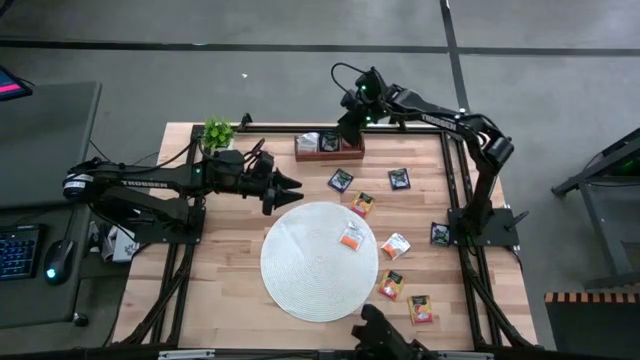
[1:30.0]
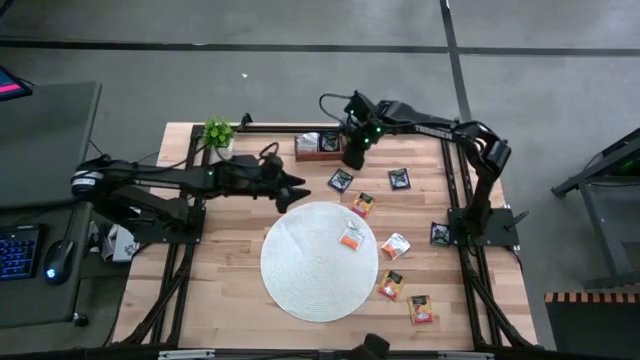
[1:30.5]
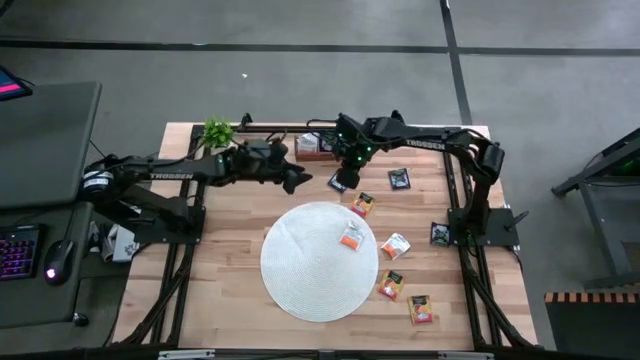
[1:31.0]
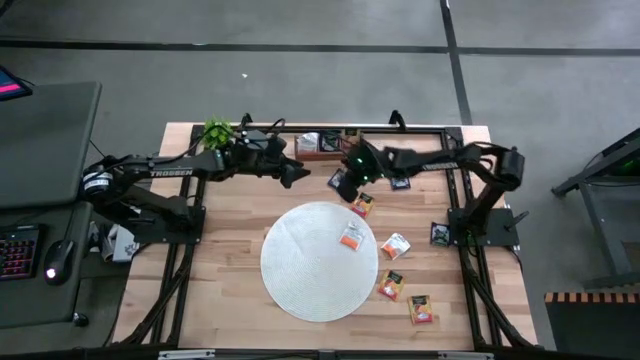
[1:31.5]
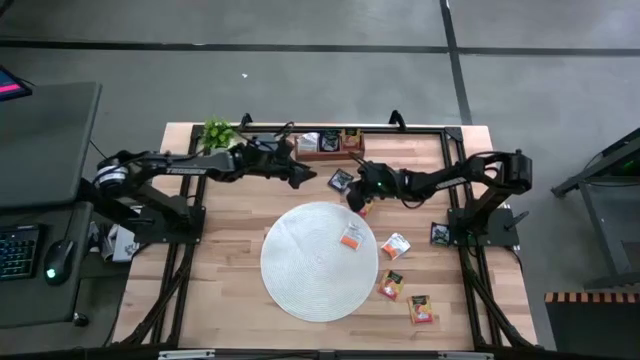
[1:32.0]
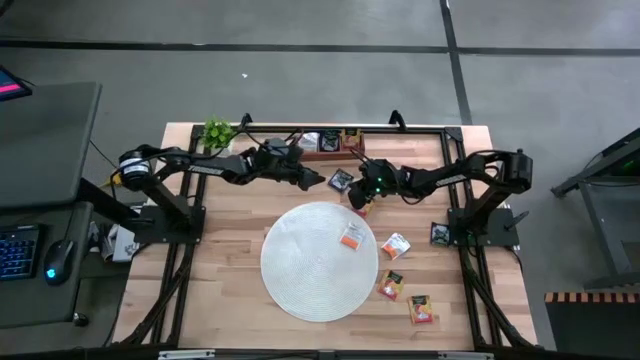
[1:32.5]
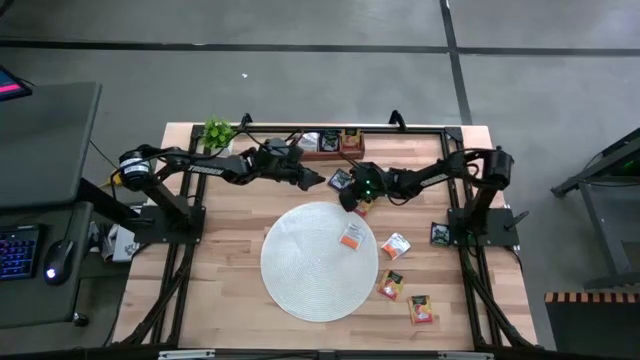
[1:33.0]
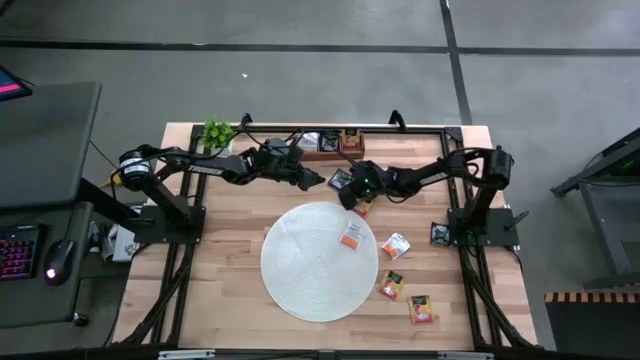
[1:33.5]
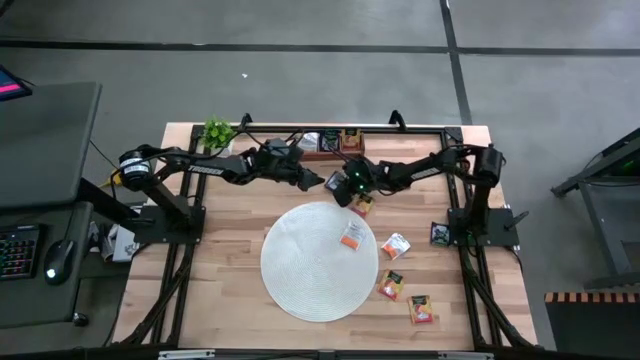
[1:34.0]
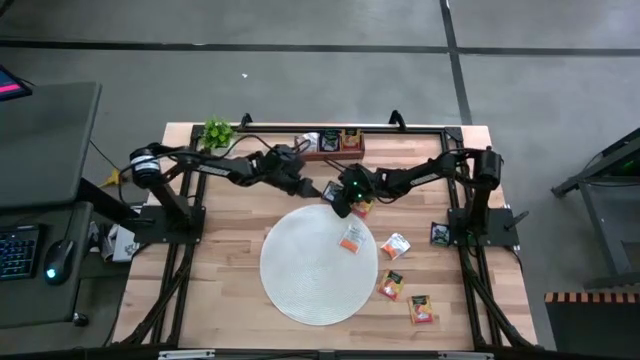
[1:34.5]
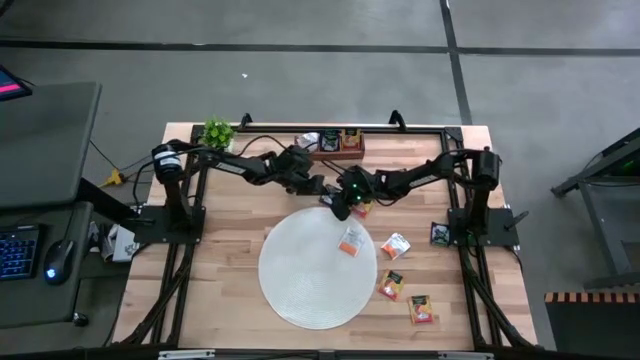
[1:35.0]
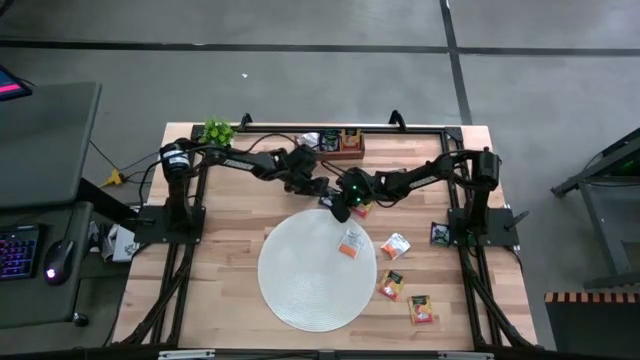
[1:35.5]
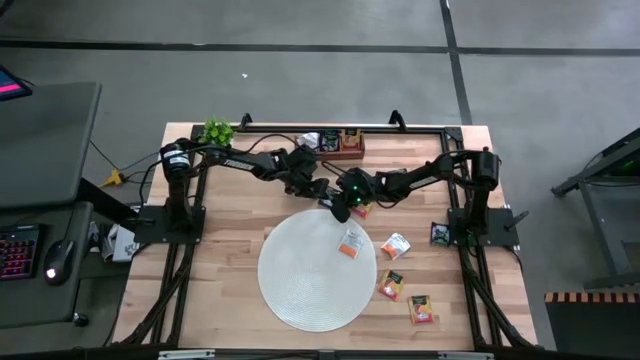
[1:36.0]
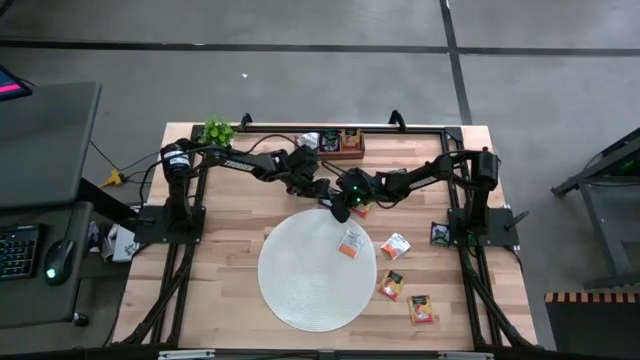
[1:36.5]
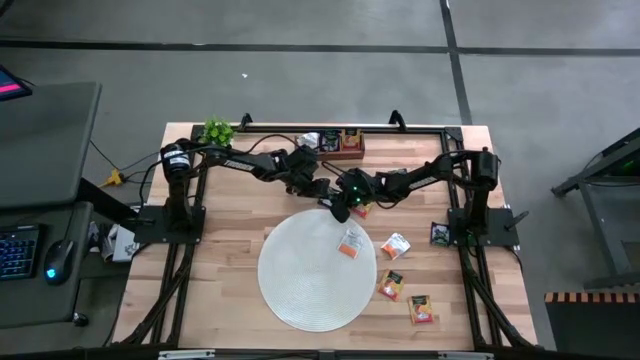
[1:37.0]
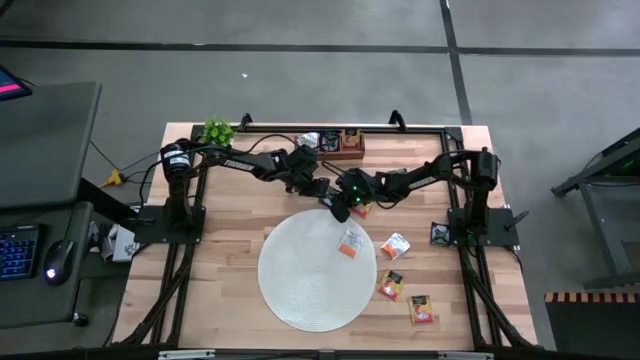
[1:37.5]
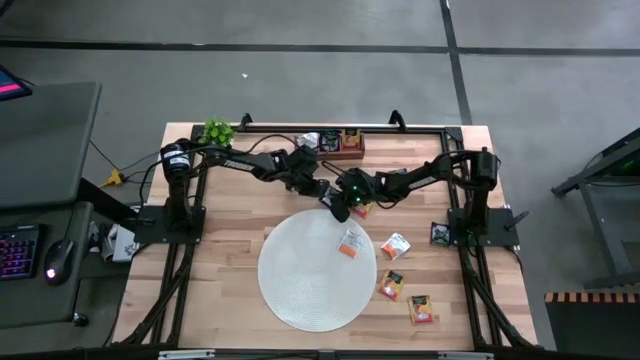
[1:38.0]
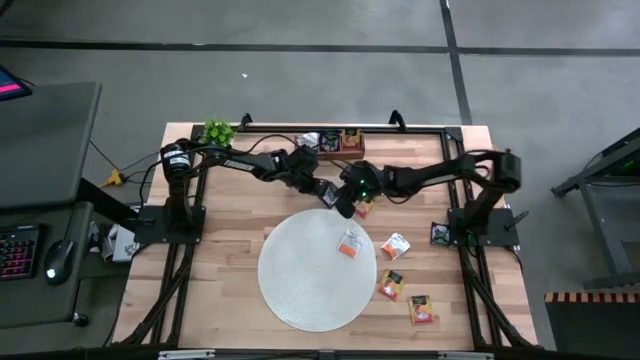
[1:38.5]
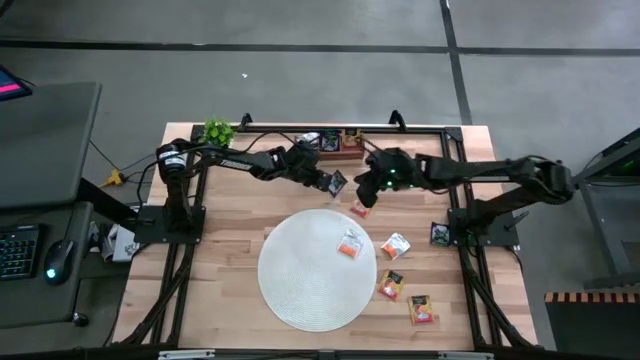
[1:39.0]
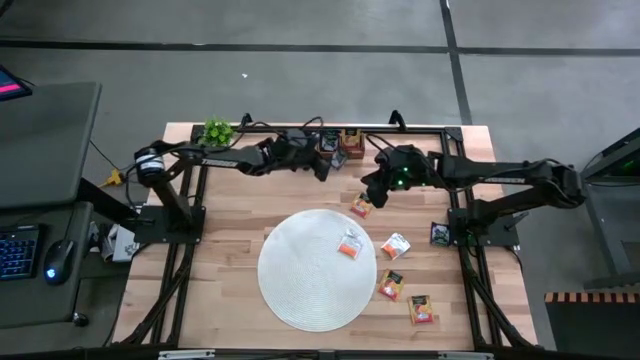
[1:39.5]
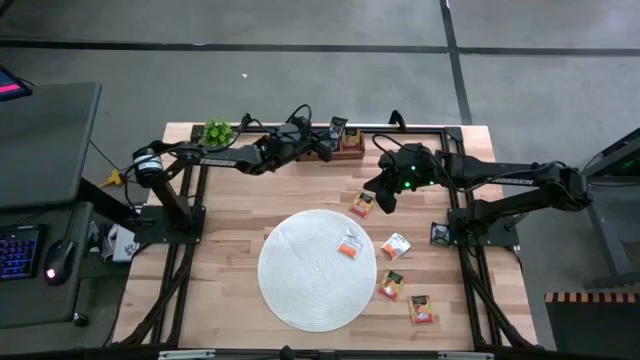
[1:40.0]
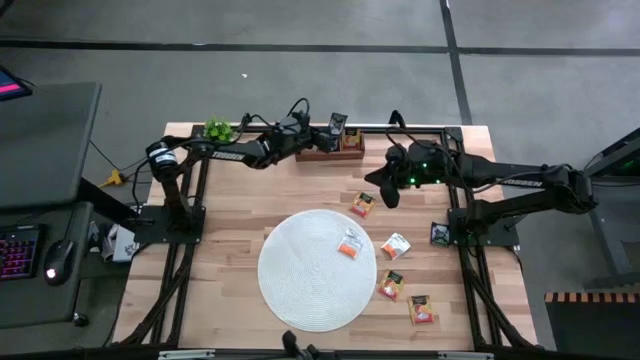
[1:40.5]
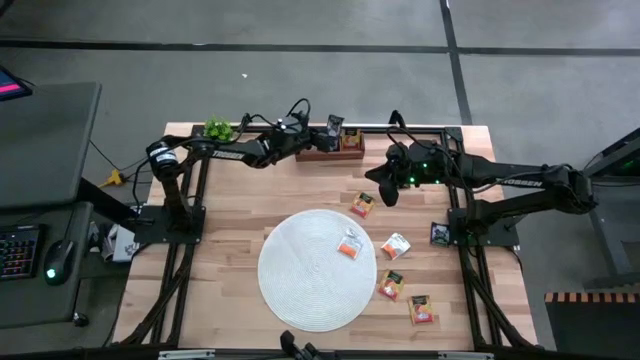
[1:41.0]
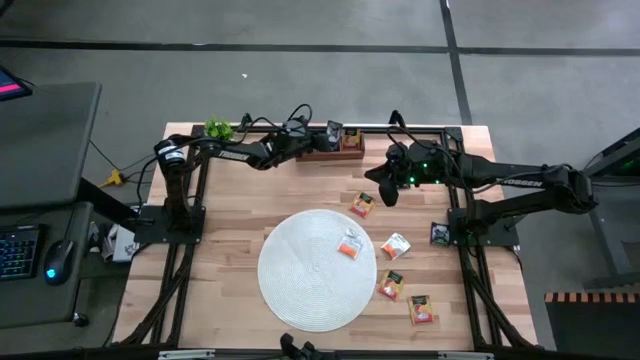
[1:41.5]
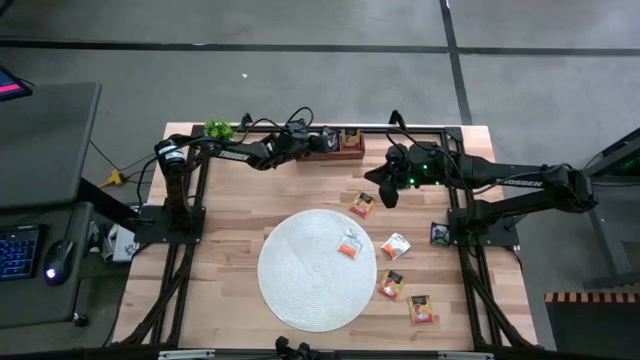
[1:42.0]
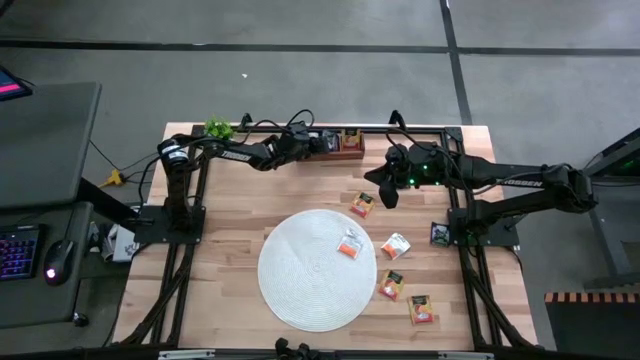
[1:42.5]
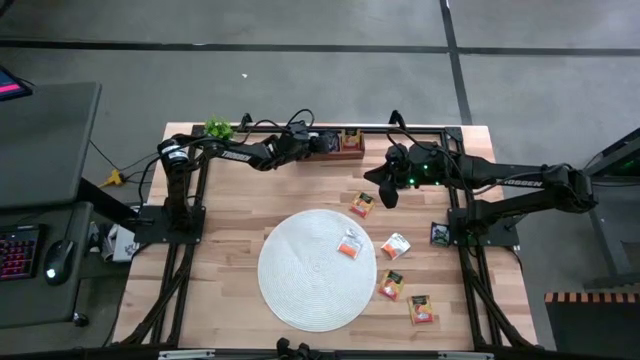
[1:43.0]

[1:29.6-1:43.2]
Task: Pick & Place Tea
Put the blue tea bag into the middle section of the wooden organizer

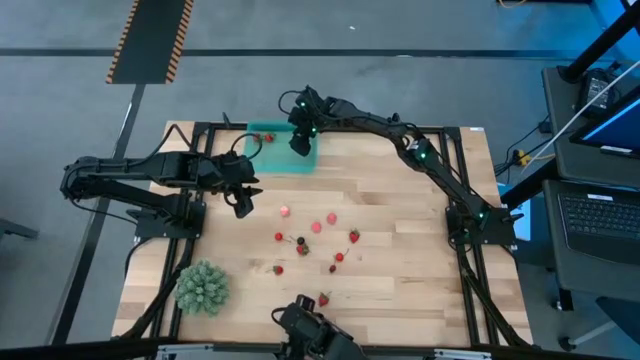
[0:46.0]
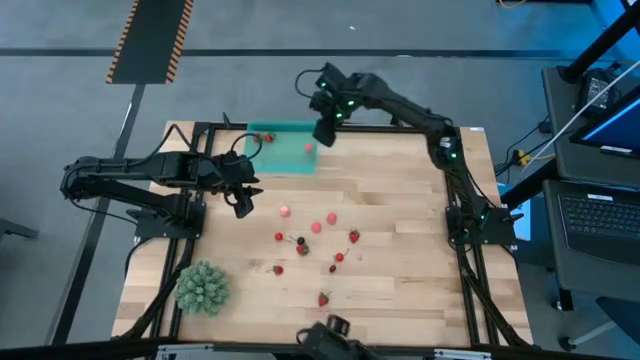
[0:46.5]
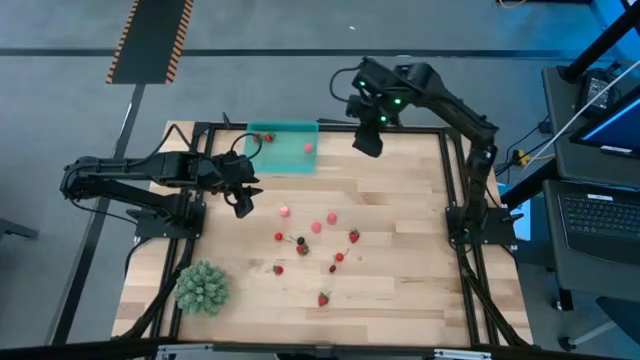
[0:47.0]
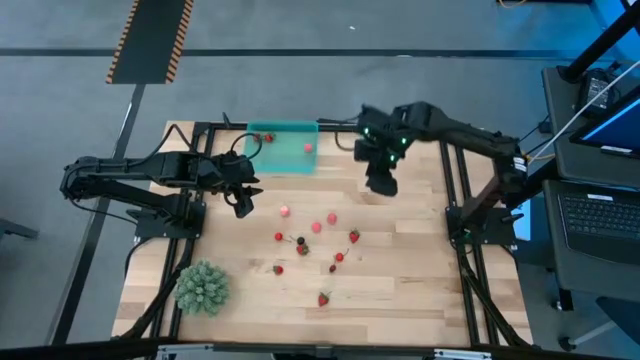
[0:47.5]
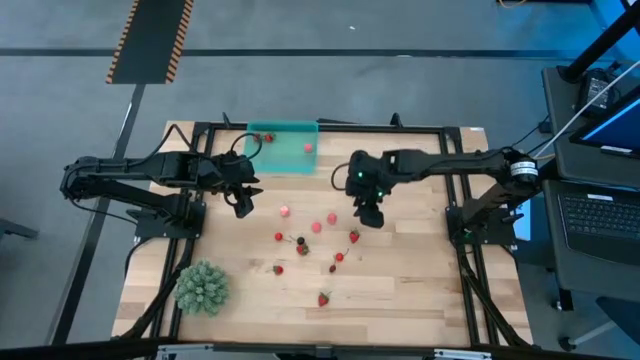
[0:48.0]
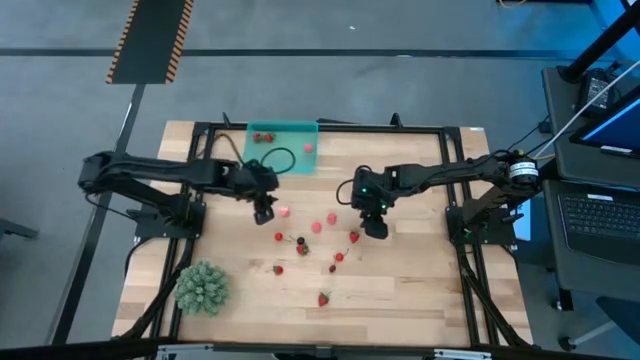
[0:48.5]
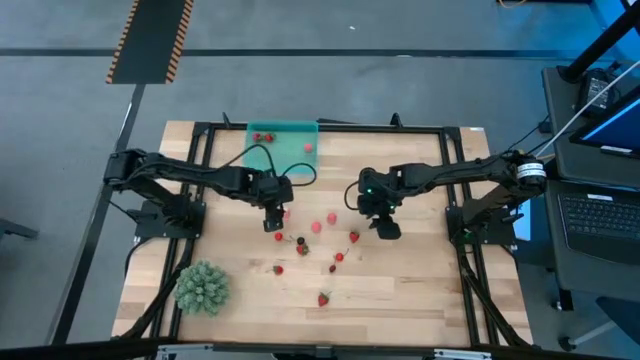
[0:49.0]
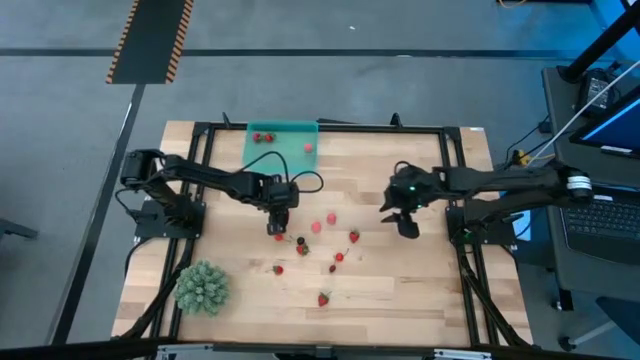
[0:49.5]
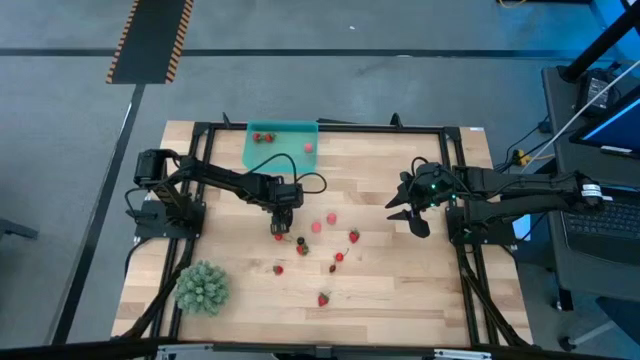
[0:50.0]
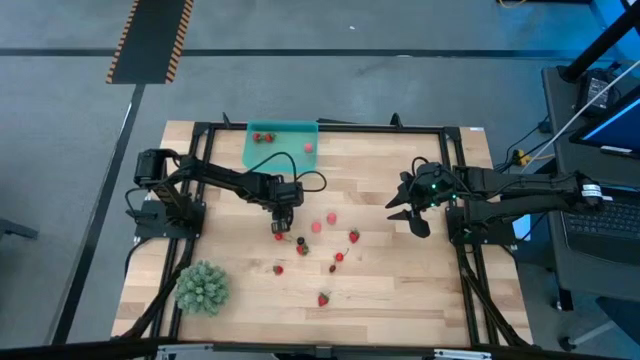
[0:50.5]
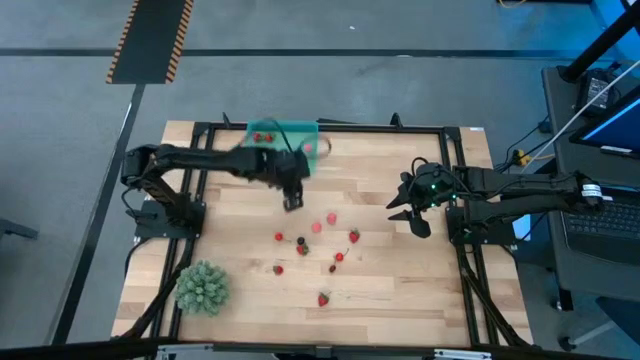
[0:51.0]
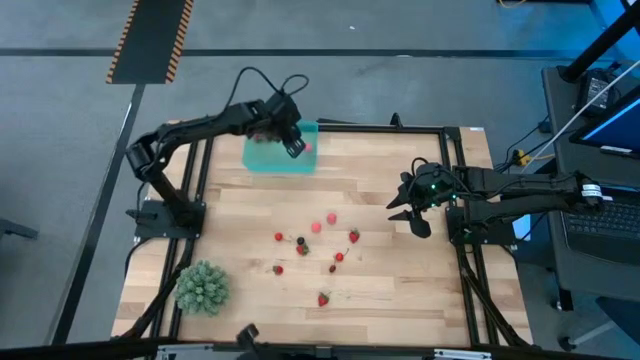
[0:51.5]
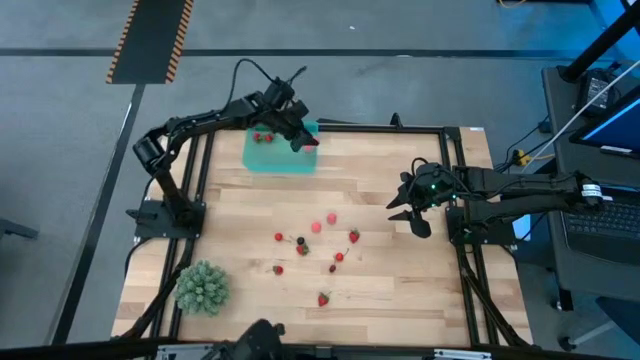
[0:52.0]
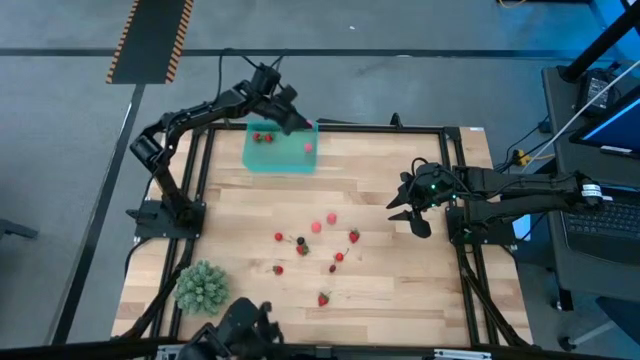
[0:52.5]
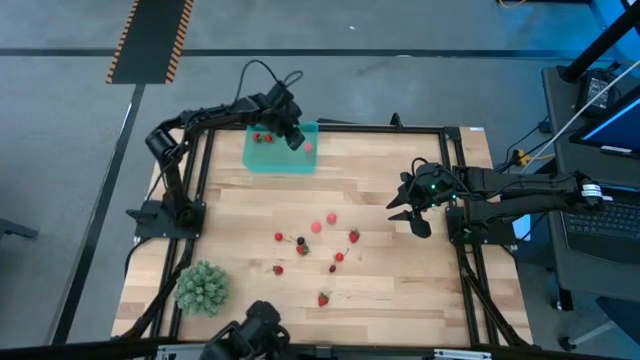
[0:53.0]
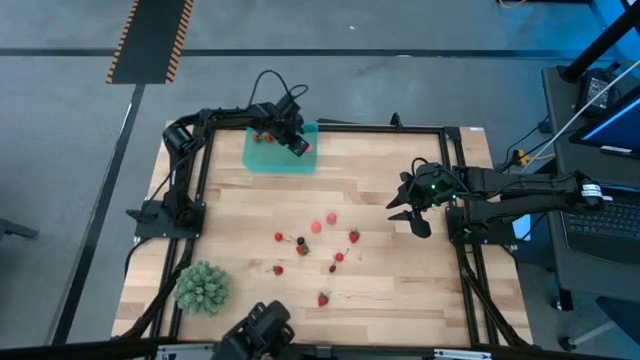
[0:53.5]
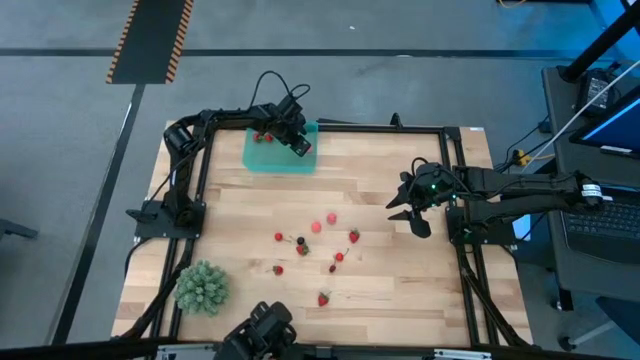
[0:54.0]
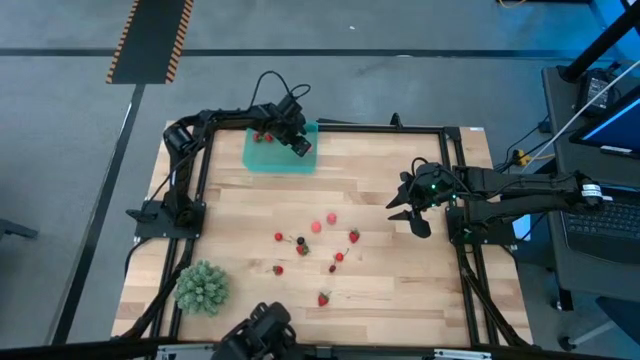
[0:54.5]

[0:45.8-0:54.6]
Task: Pick and placing Produce into tupperware
Put the pink peach into the blue bin
